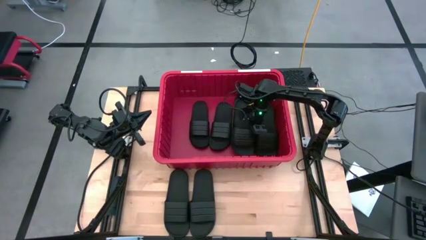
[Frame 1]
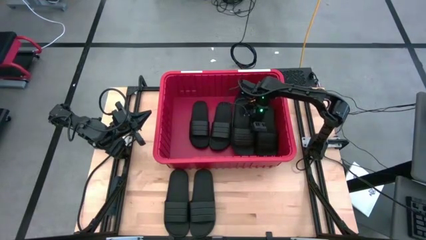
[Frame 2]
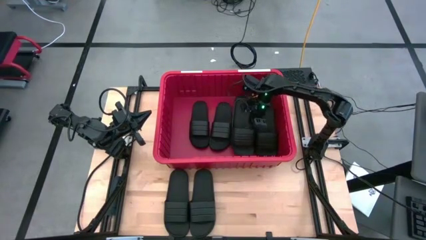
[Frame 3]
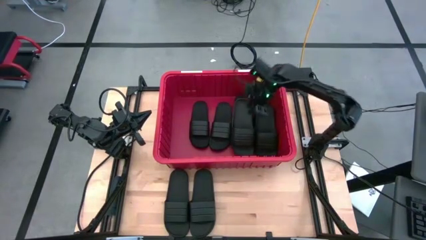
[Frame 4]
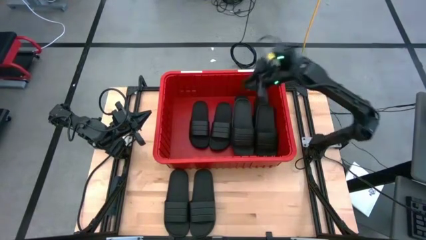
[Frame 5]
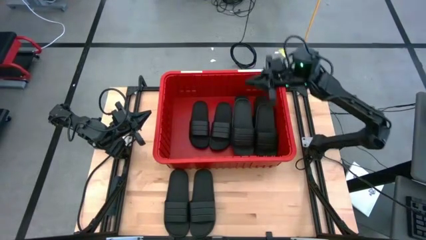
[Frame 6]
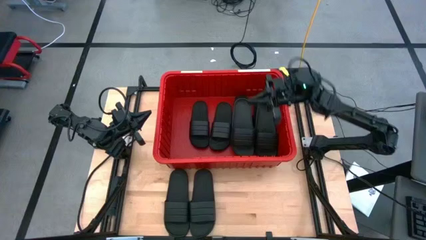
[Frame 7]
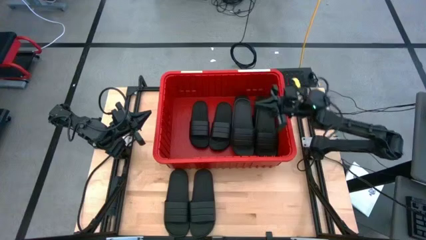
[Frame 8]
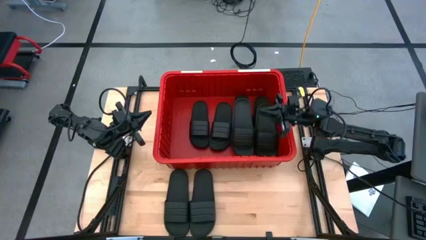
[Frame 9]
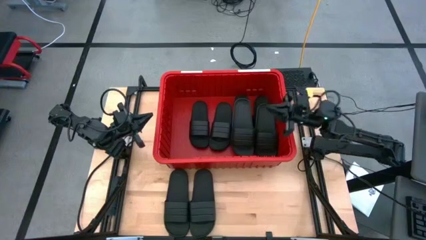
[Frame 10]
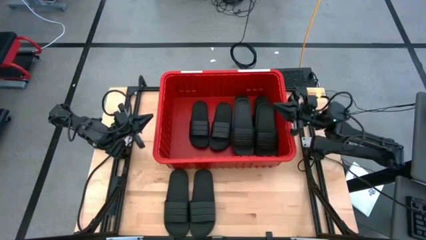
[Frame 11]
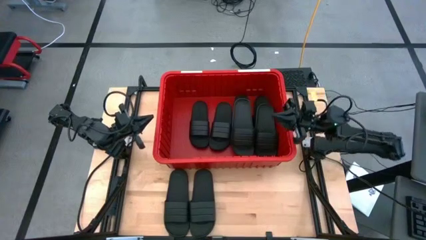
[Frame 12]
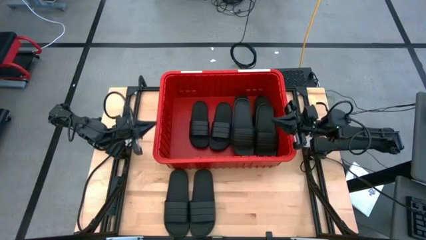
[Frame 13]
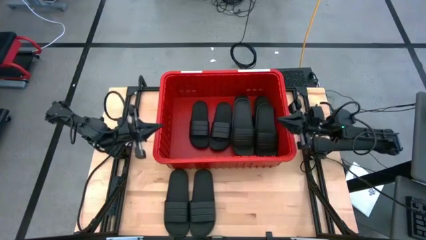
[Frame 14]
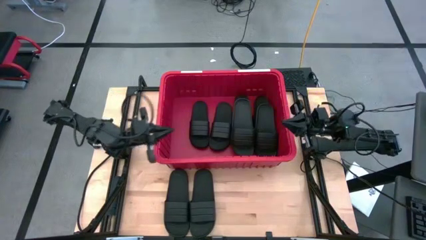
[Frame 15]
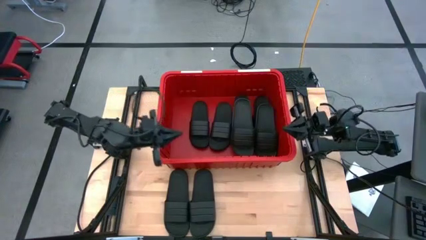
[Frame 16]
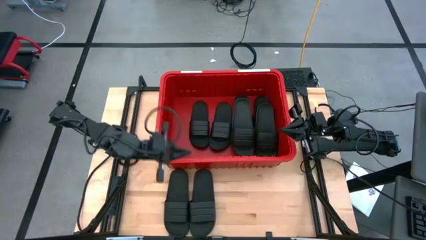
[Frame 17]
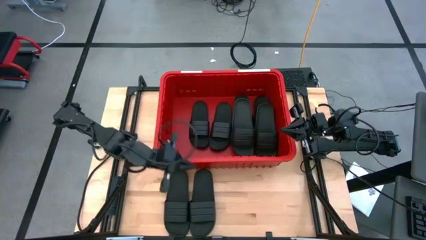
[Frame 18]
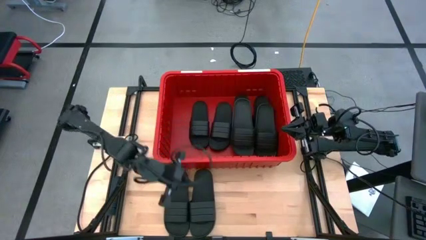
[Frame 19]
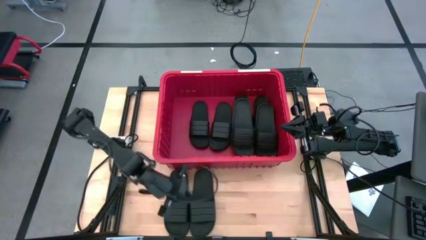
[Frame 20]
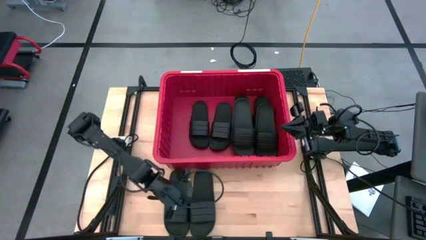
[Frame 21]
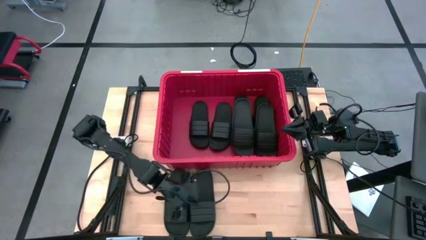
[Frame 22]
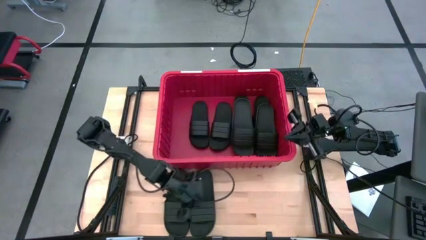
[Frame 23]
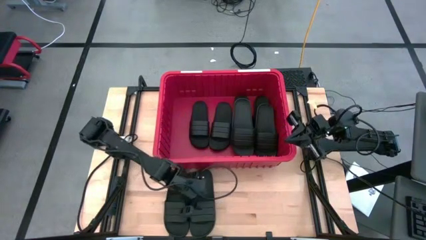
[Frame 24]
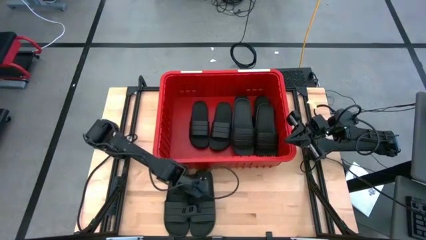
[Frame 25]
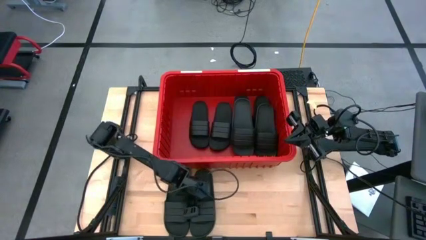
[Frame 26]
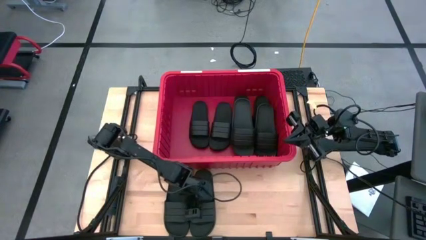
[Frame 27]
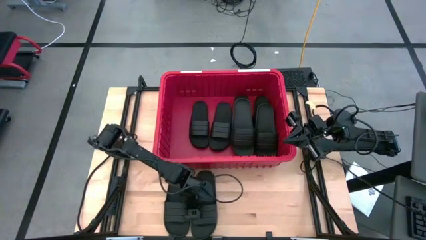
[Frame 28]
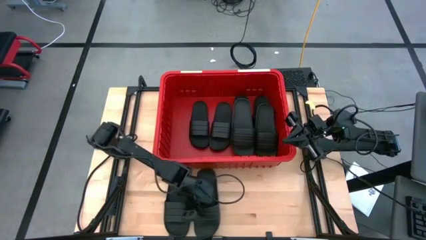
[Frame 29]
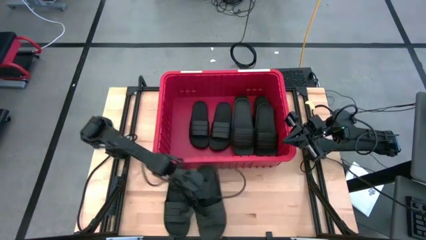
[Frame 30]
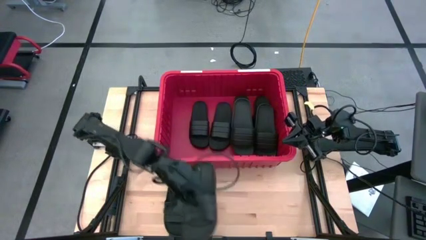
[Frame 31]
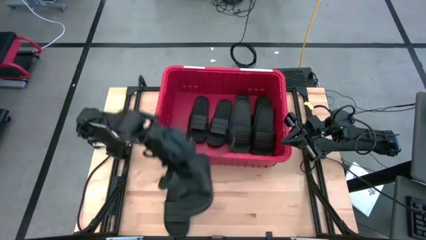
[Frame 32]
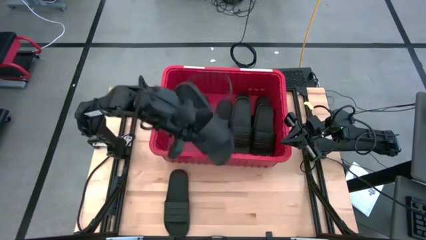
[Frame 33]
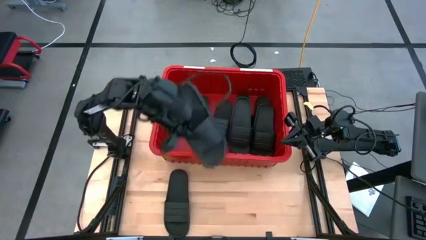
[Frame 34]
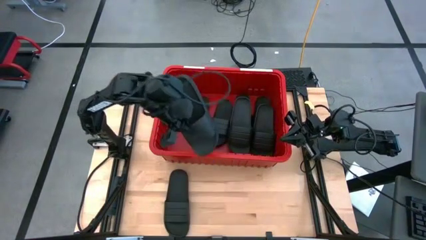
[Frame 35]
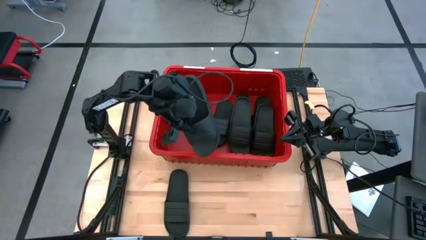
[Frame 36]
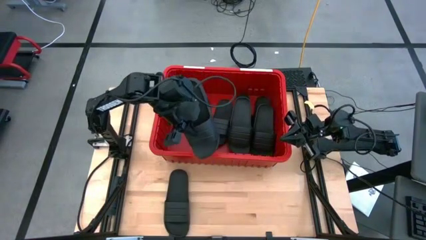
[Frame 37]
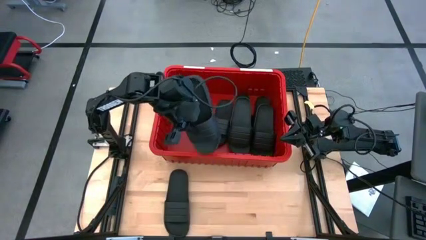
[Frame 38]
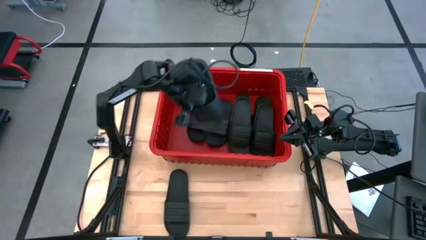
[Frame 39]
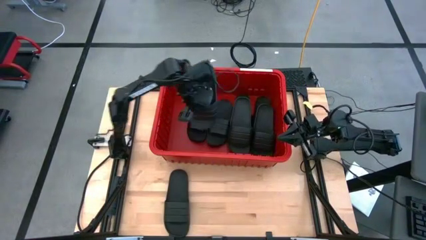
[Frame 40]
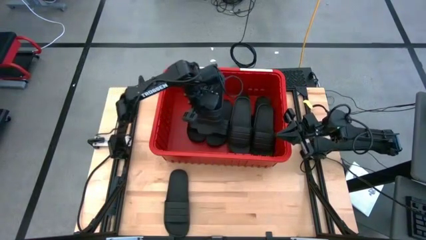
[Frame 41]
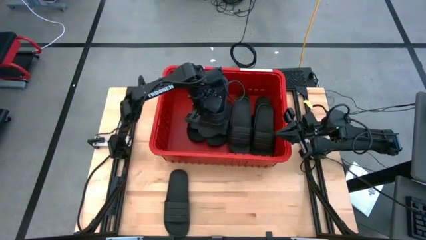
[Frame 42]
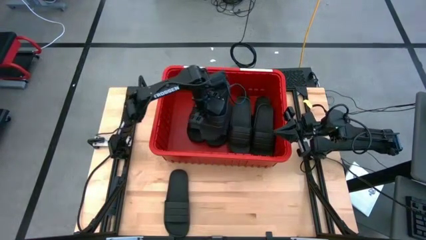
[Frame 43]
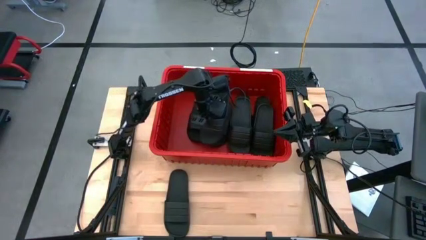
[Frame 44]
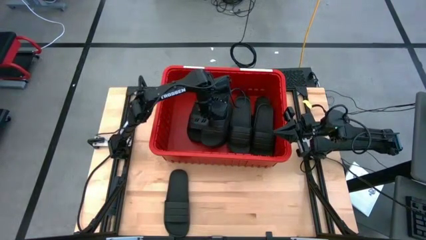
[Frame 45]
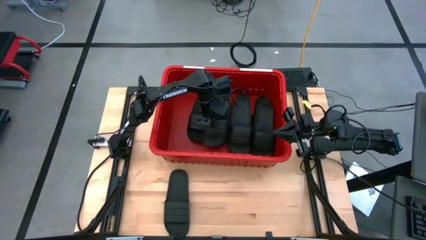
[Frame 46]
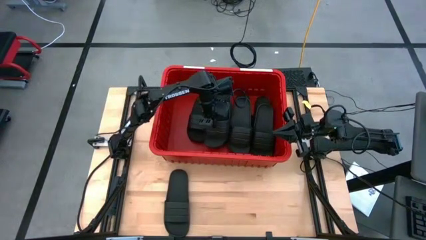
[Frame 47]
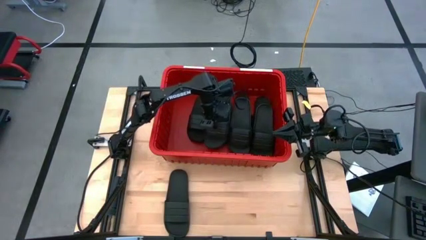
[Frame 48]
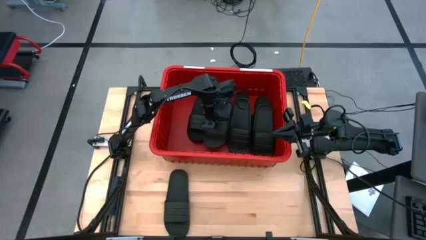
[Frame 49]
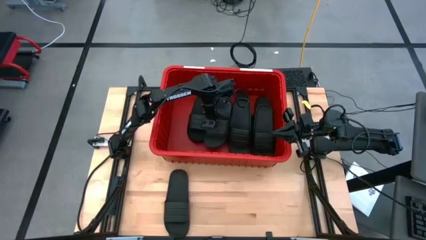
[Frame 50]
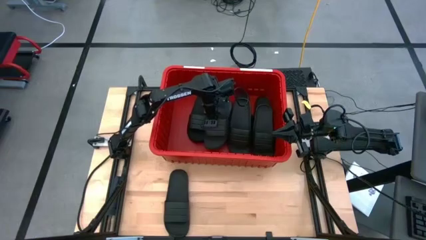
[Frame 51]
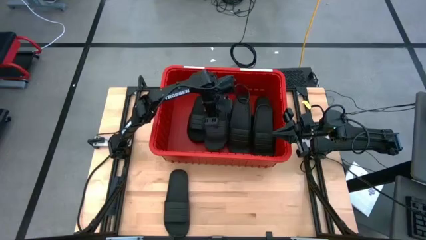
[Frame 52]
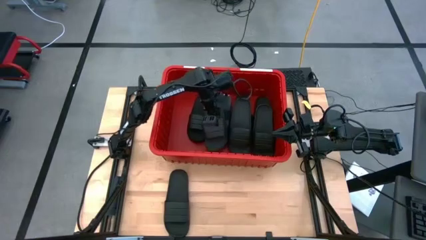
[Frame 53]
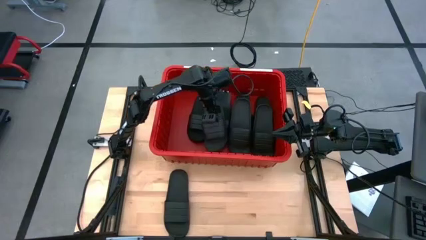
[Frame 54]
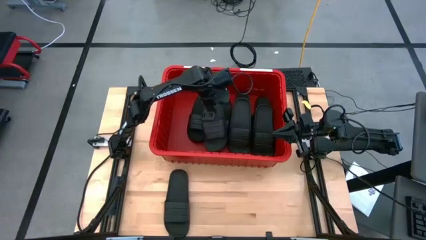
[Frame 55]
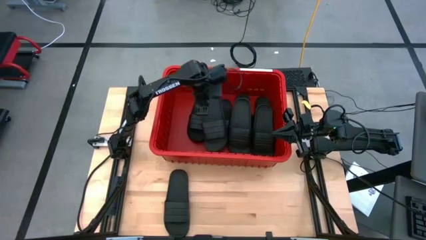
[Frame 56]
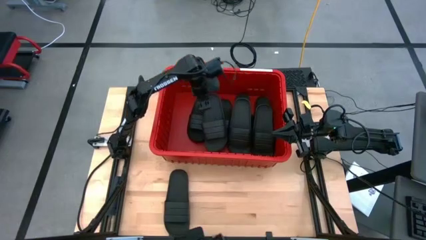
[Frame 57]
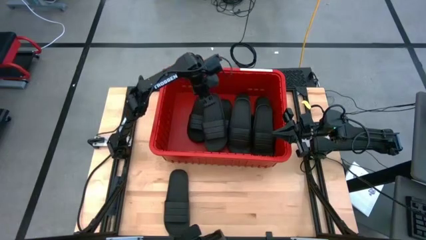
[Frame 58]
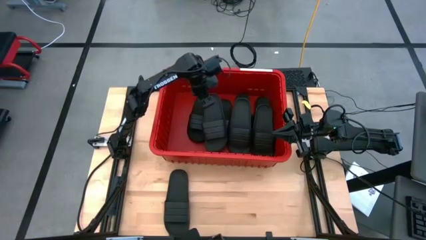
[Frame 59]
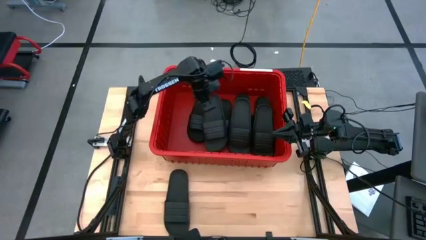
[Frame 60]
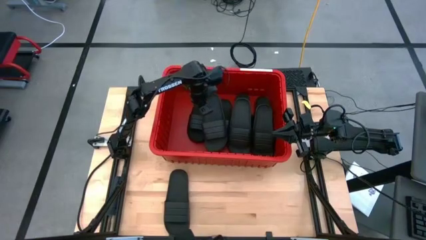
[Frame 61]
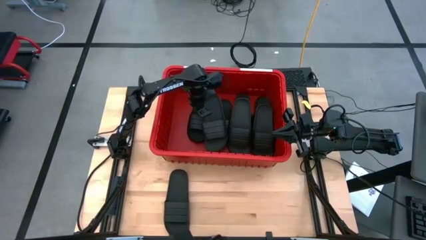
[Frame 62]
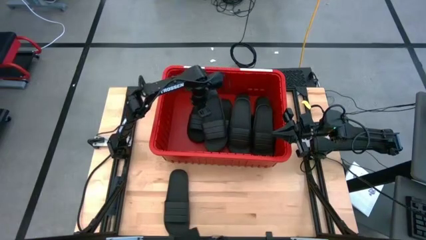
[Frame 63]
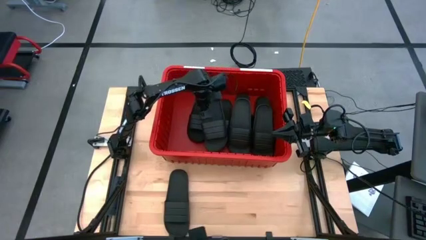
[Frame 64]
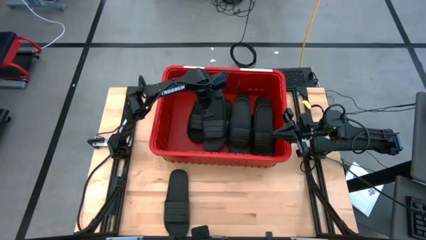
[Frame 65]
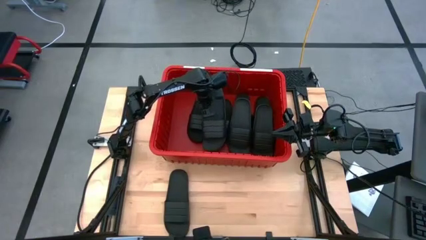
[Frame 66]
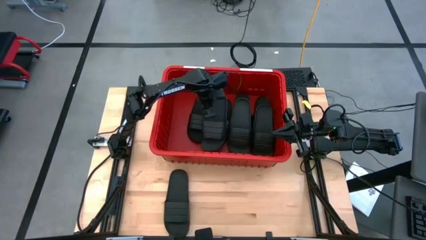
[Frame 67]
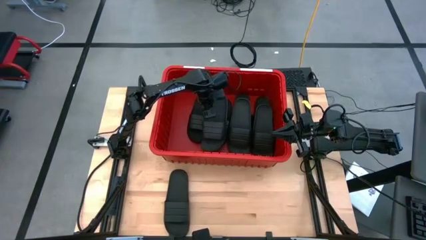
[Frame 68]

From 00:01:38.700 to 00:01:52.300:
Task: Pick and place slides into bin
Put the black slides into the red bin

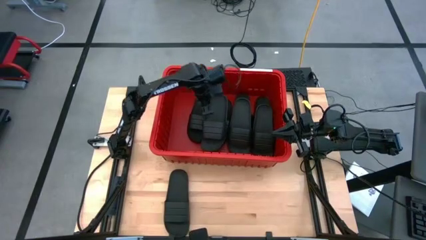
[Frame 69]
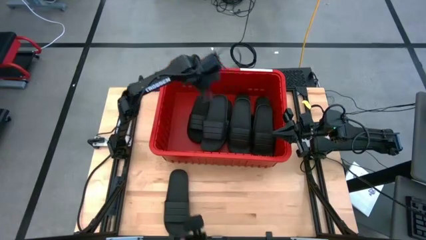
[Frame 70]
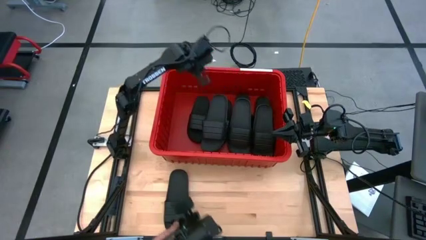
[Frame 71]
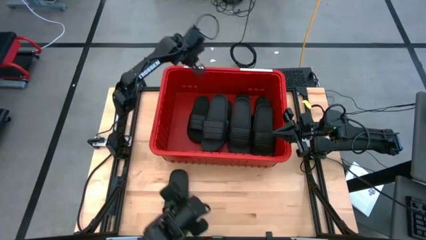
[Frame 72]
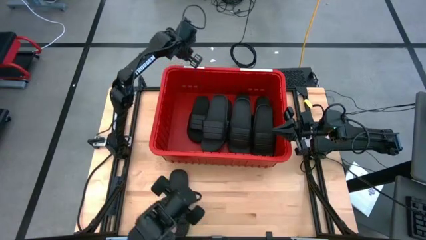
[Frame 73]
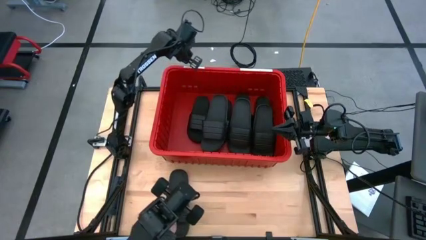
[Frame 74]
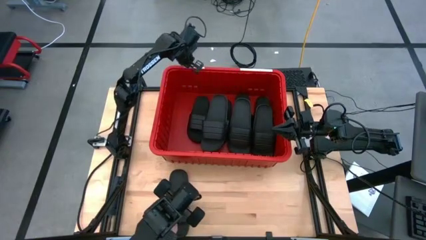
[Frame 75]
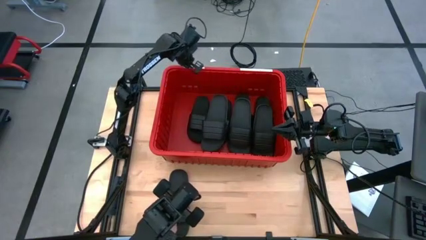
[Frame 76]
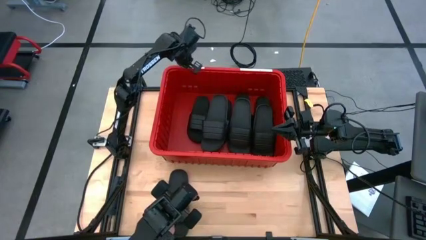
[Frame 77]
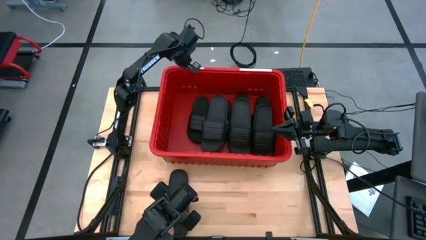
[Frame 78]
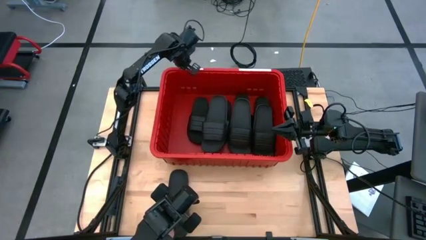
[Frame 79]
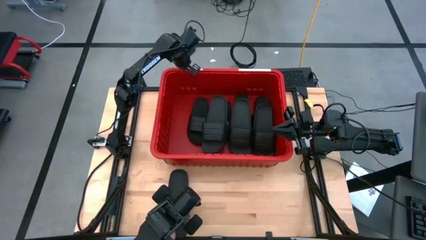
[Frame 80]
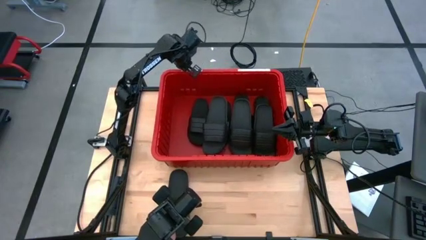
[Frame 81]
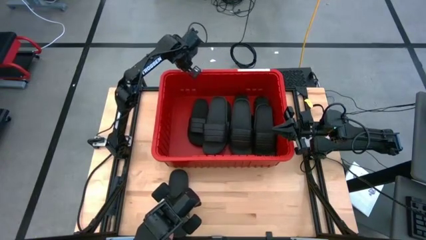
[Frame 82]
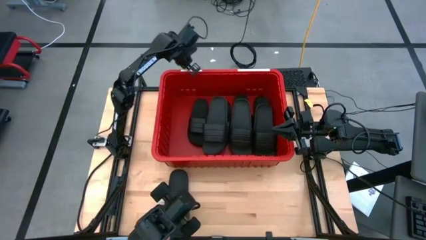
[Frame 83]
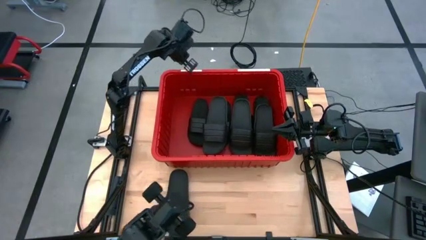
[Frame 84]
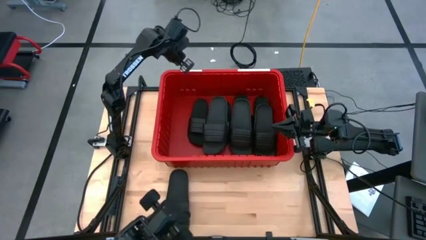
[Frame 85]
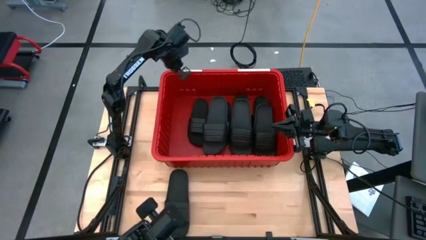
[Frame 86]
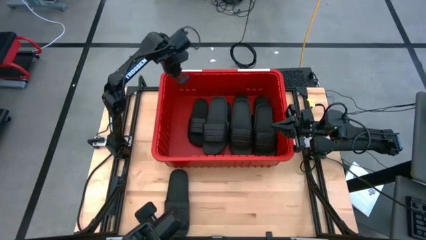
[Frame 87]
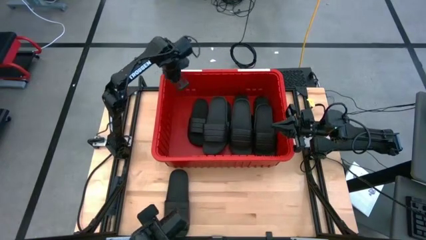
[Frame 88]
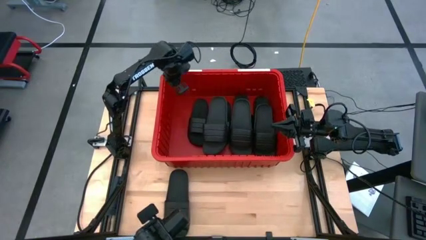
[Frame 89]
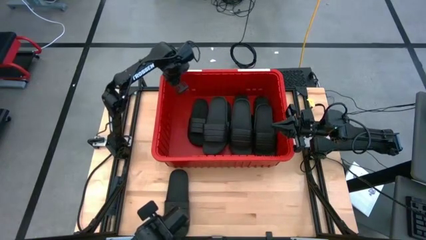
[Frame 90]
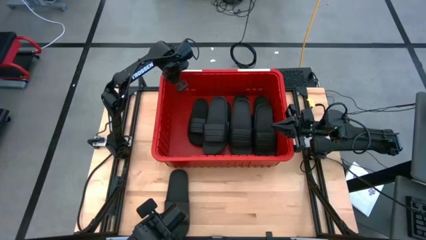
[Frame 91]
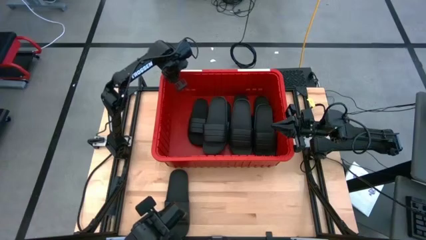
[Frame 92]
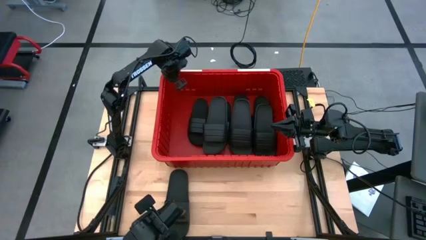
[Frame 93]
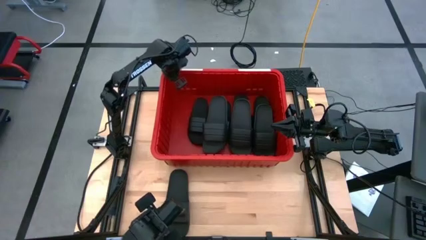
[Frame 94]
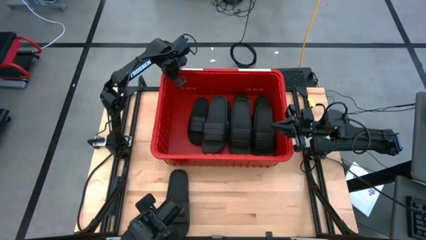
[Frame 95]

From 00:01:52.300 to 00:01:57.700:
Adjust the red bin
